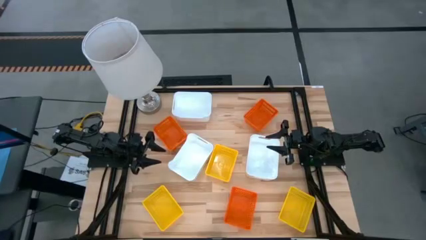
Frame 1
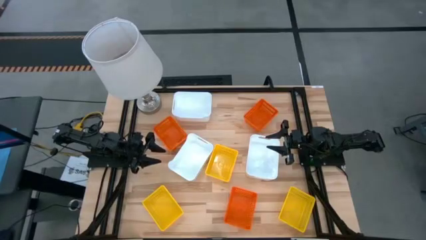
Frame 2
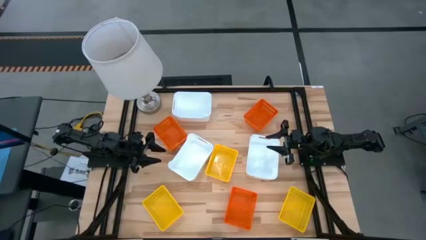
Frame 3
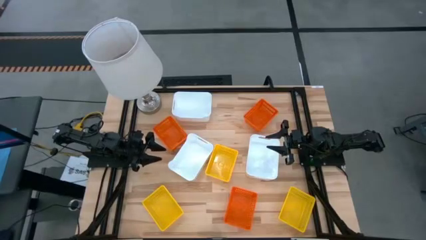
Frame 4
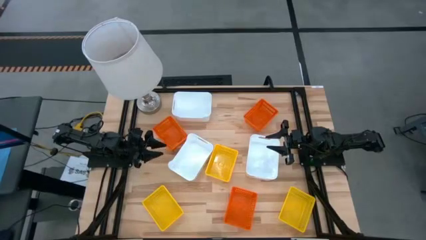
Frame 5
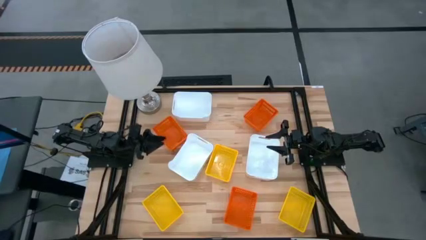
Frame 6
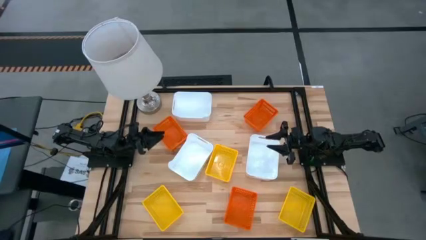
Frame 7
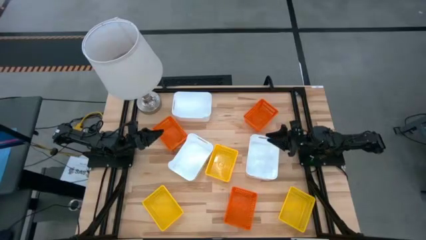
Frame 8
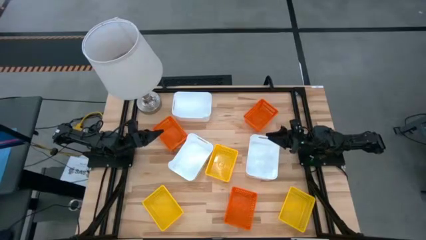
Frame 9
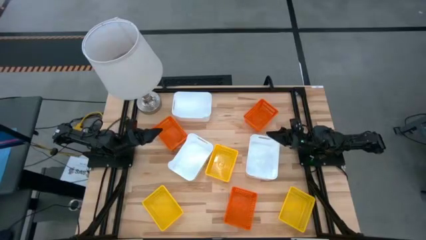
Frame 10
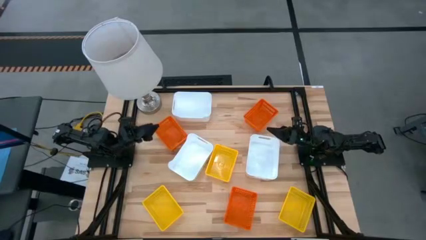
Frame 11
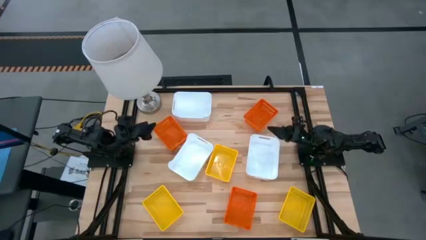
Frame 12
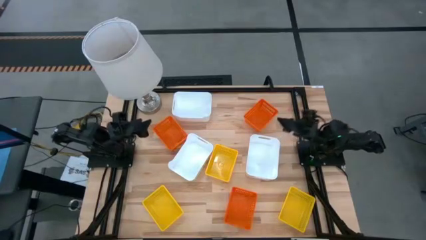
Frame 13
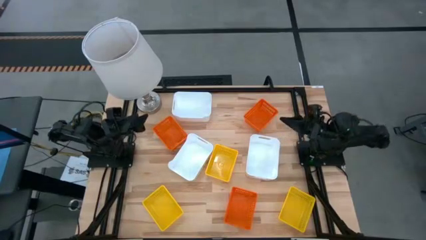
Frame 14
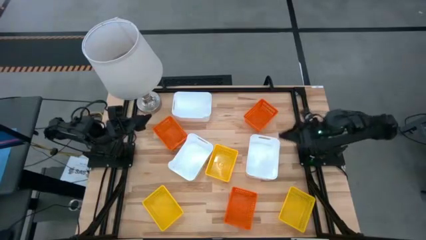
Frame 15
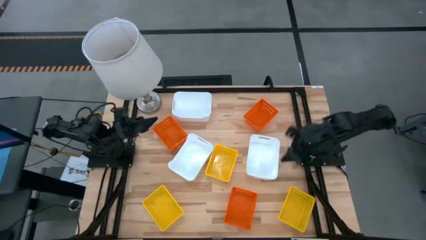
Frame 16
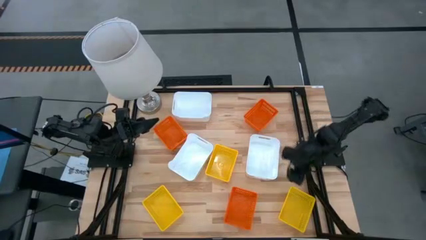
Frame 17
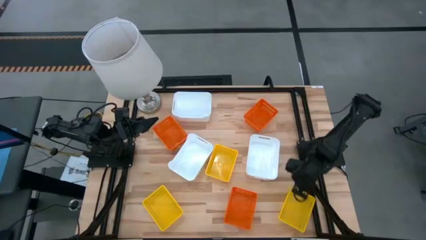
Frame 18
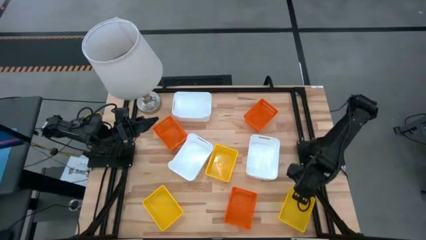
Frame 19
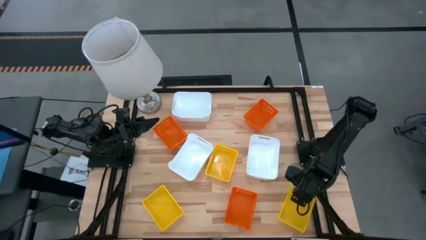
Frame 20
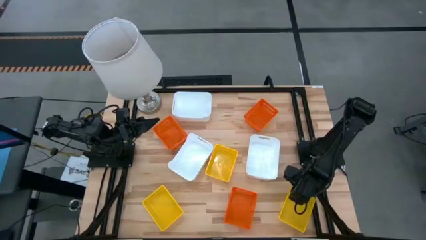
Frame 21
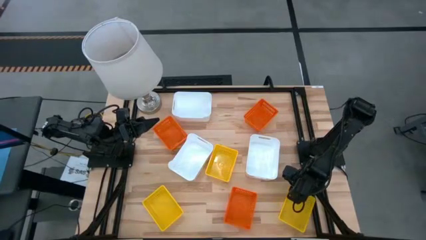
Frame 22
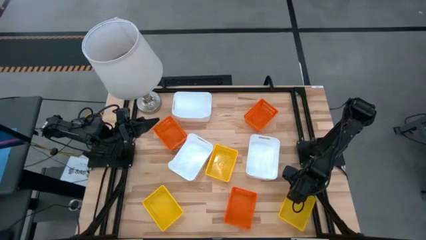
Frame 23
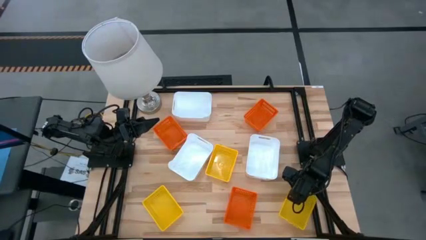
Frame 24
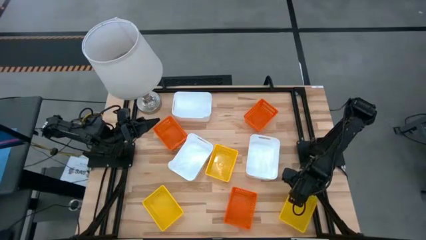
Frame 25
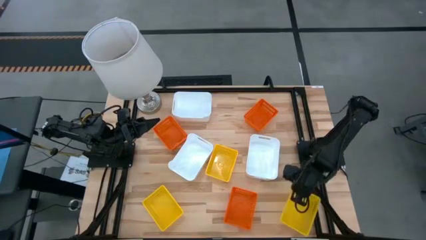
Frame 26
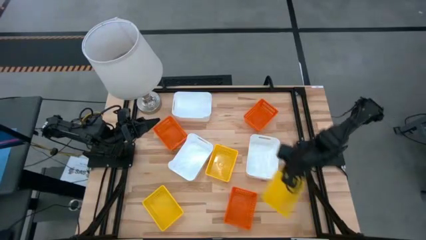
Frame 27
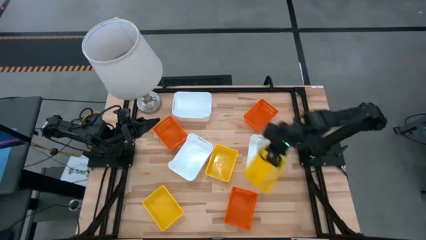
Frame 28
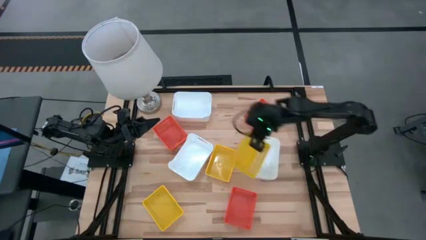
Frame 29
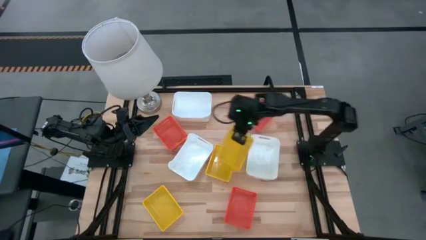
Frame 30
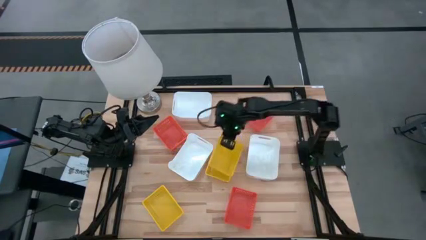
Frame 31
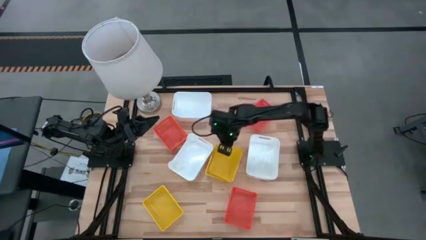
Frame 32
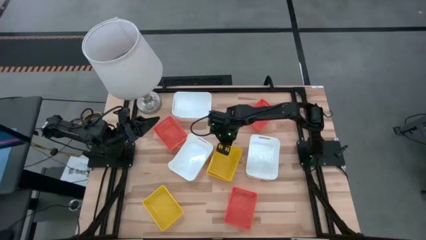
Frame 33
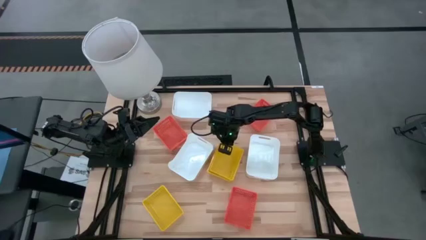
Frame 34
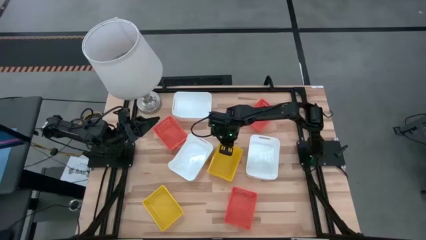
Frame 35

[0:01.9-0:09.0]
Stack the bottom right yellow bin on the top yellow bin

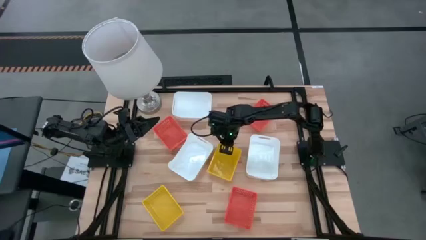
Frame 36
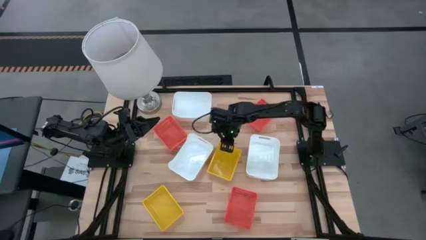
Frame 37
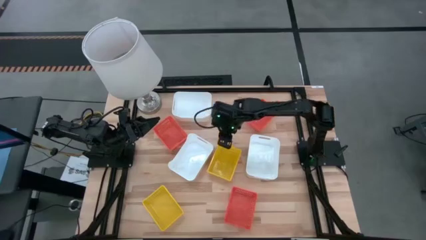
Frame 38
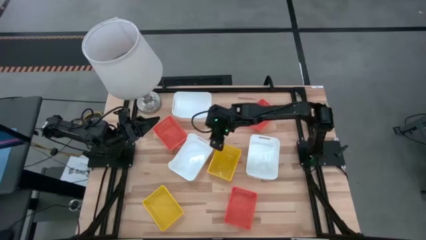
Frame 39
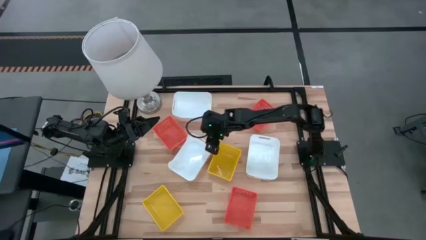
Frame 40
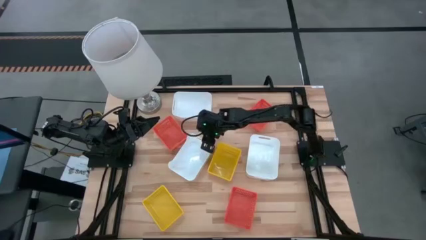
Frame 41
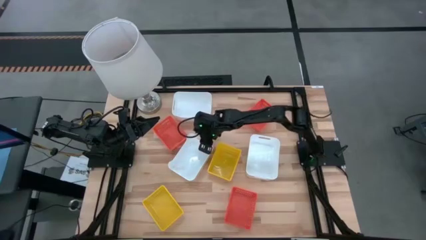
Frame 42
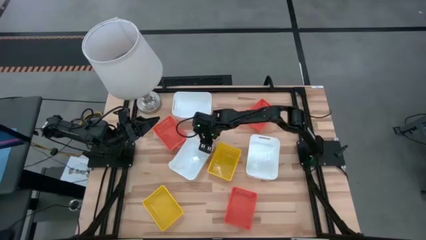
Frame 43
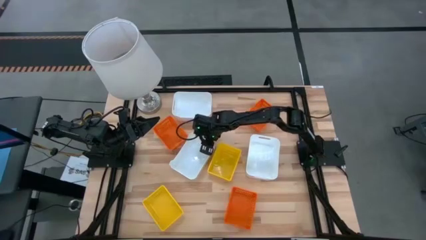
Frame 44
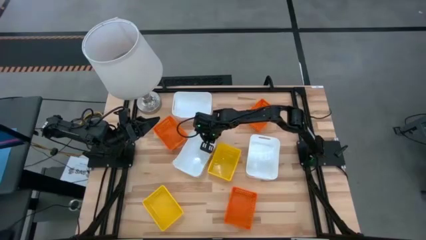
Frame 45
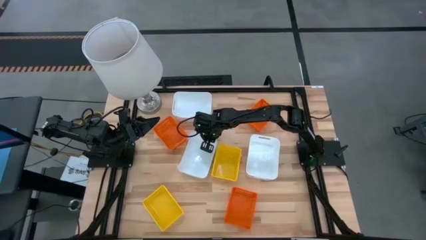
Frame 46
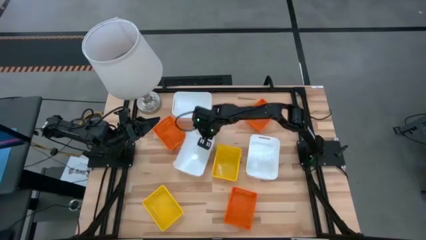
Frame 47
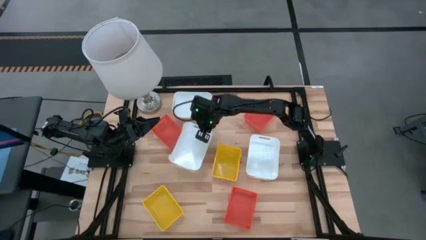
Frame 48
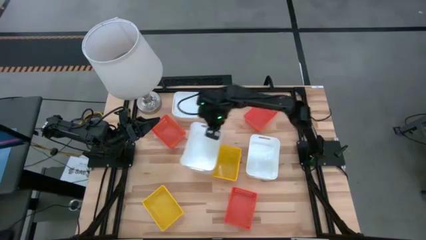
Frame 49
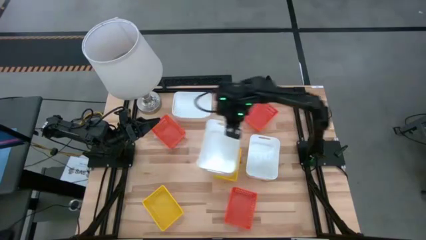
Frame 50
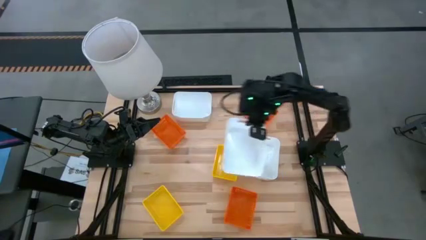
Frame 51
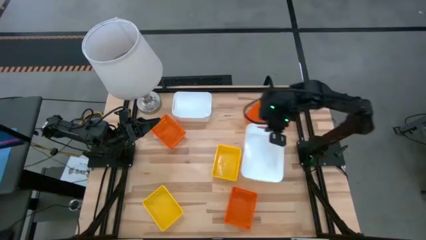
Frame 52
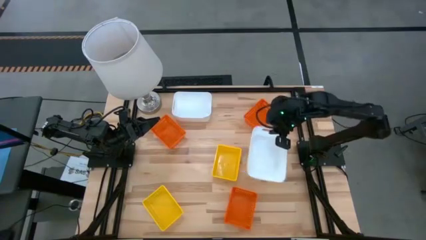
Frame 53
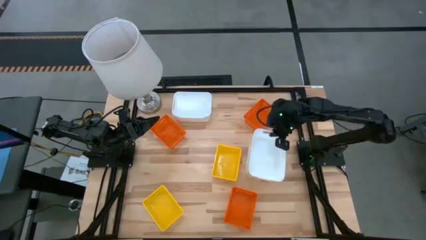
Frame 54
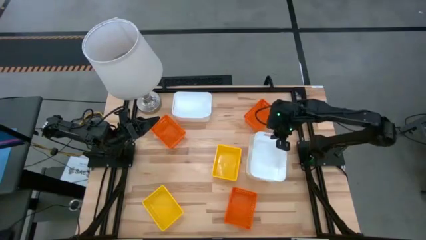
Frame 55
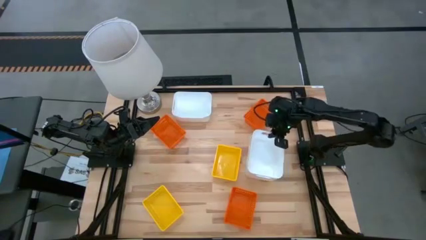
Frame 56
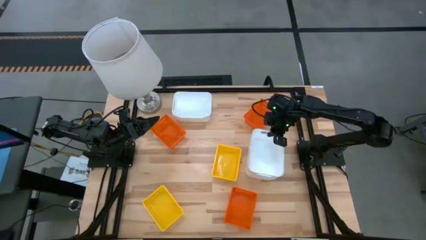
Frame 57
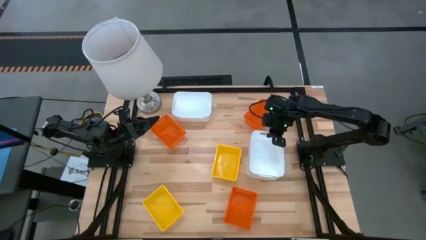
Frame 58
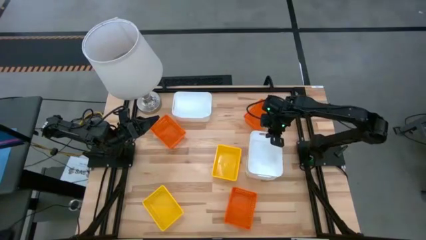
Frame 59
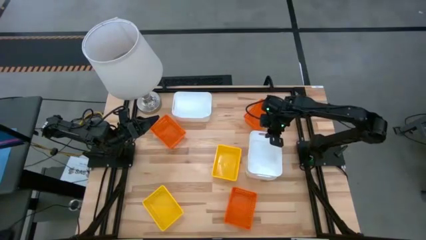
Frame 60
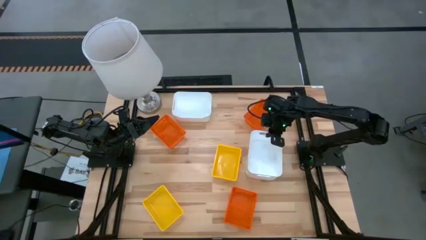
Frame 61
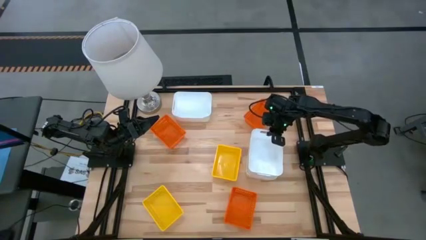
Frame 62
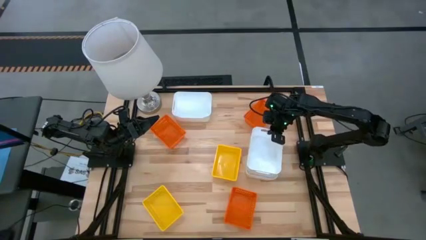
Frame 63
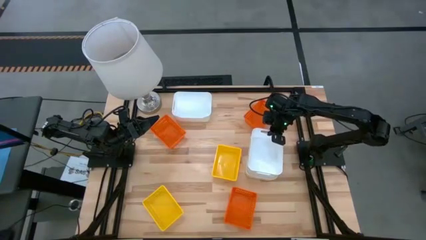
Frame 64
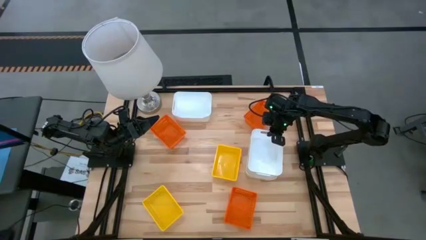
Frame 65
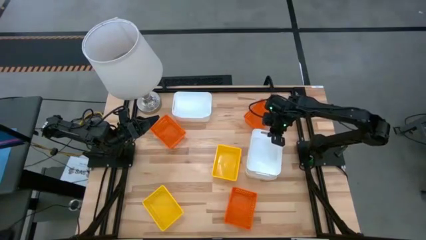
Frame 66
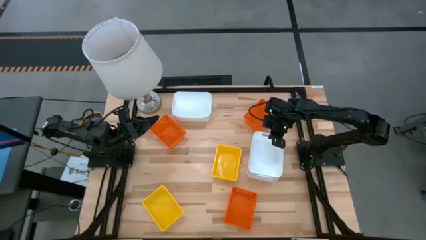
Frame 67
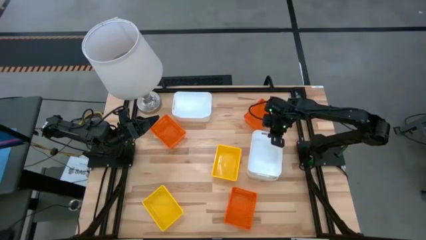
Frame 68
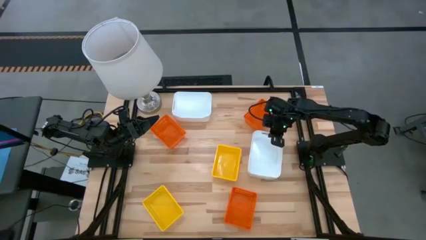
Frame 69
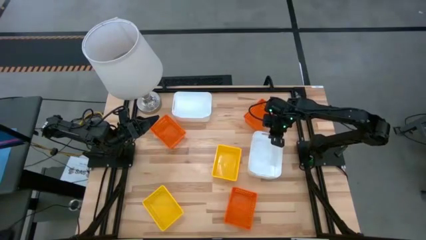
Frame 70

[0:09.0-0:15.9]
Stack the bottom left white bin on the bottom right white bin
